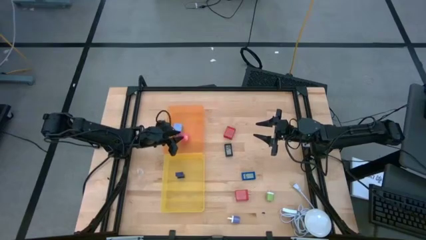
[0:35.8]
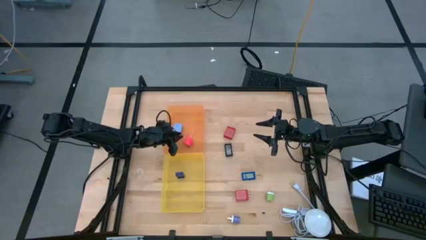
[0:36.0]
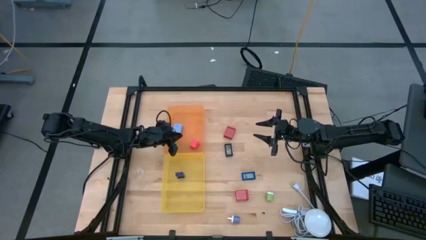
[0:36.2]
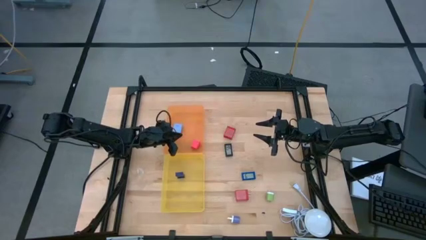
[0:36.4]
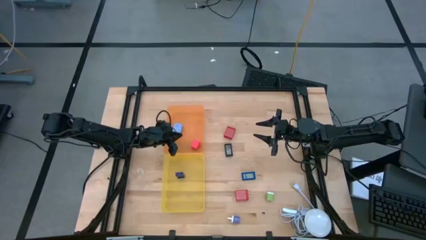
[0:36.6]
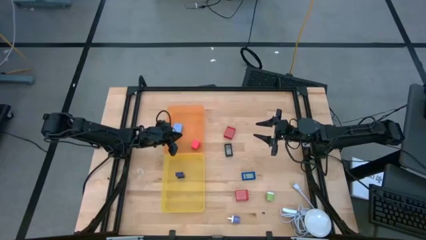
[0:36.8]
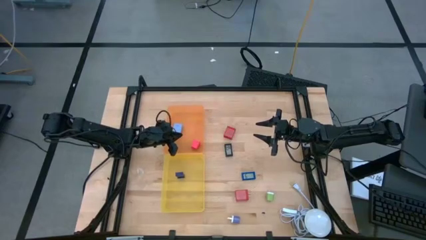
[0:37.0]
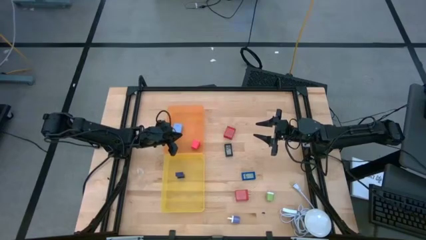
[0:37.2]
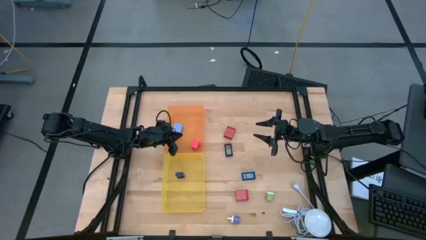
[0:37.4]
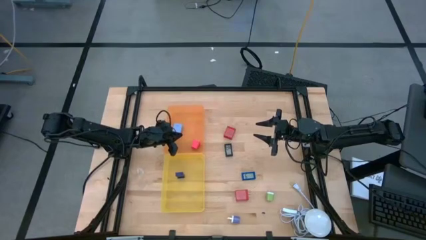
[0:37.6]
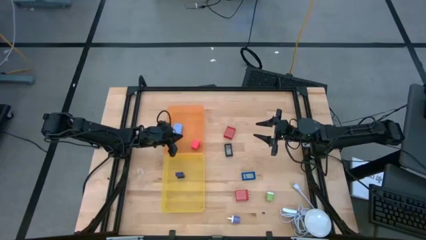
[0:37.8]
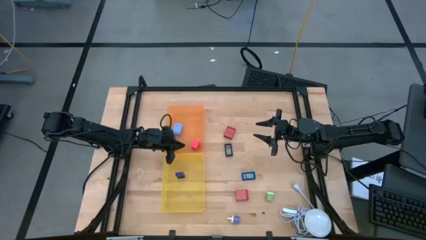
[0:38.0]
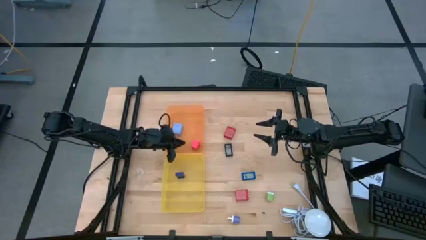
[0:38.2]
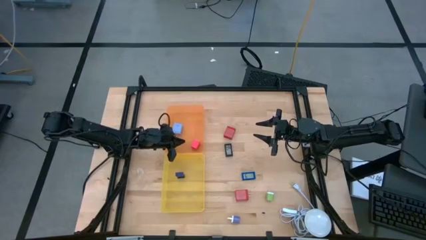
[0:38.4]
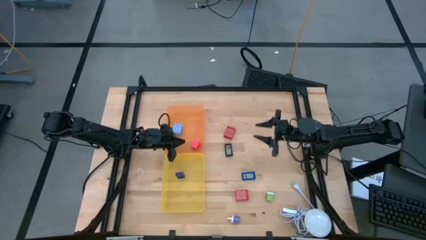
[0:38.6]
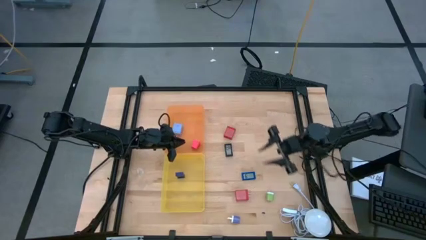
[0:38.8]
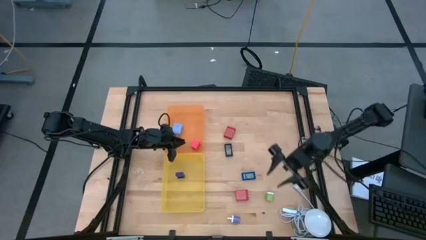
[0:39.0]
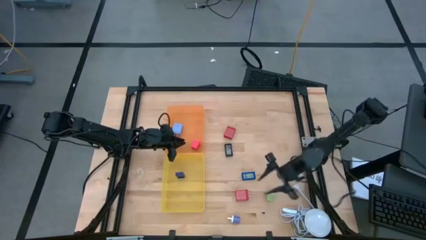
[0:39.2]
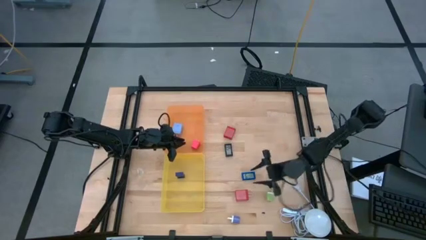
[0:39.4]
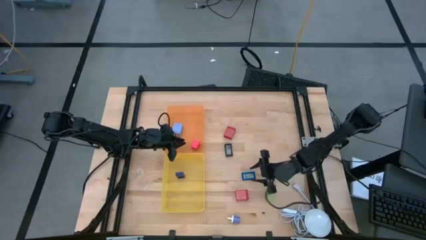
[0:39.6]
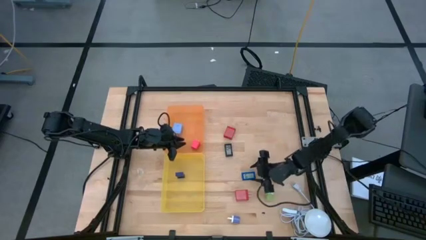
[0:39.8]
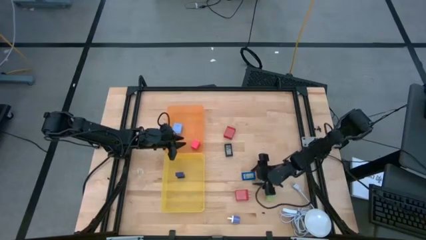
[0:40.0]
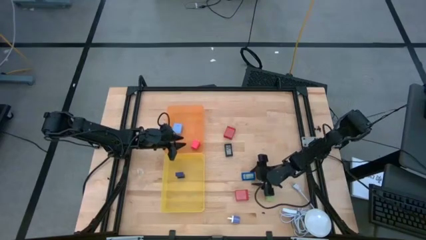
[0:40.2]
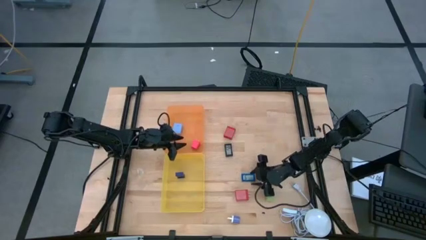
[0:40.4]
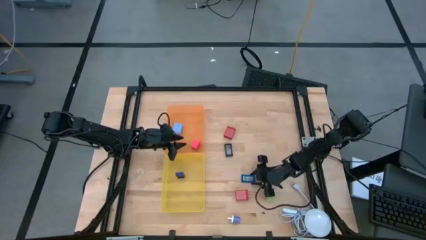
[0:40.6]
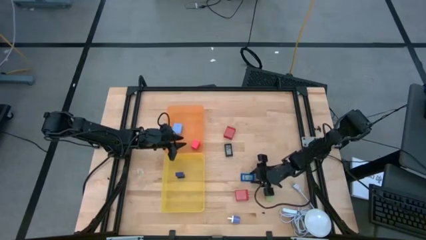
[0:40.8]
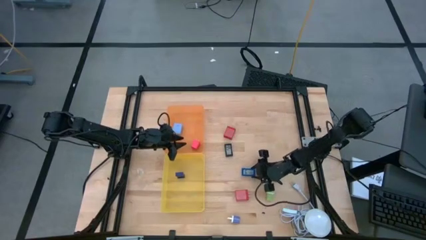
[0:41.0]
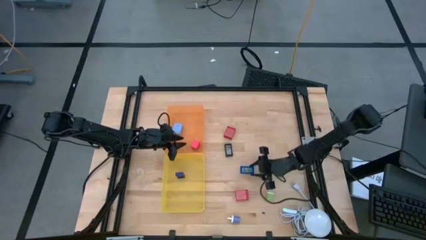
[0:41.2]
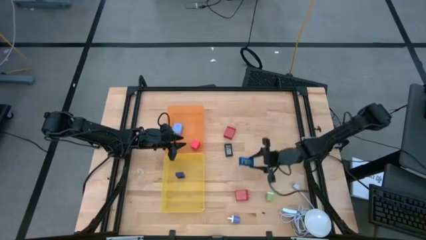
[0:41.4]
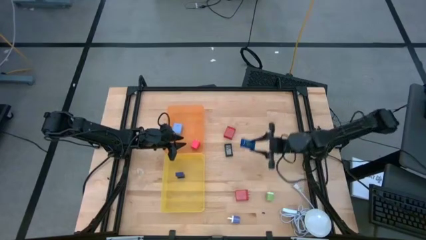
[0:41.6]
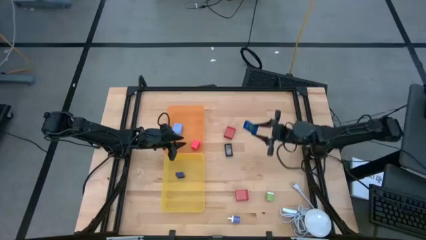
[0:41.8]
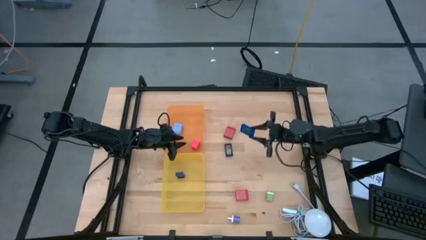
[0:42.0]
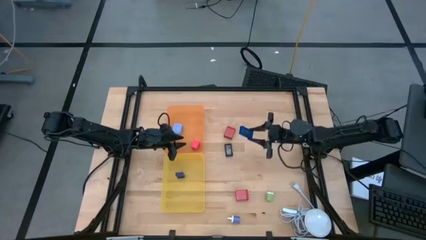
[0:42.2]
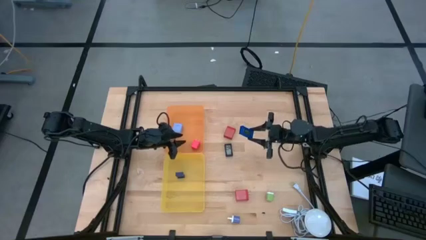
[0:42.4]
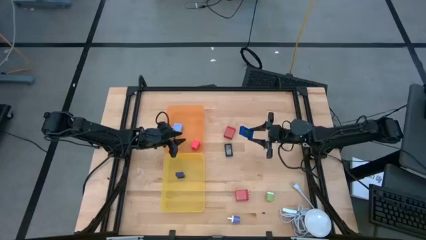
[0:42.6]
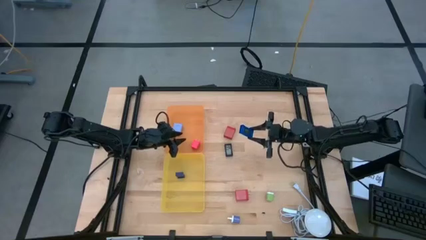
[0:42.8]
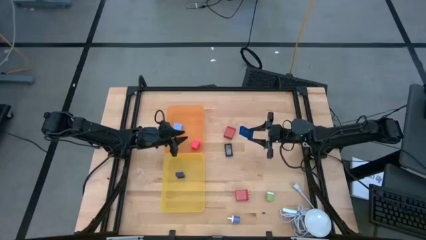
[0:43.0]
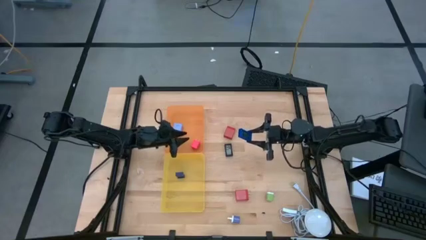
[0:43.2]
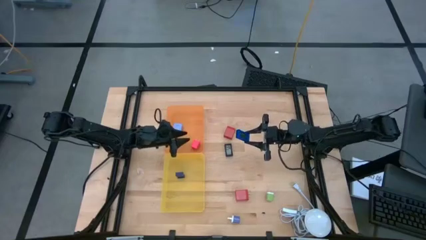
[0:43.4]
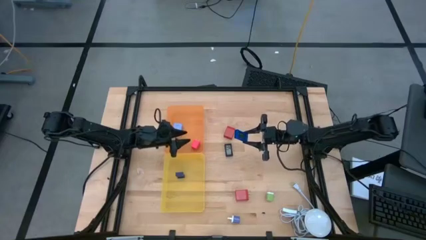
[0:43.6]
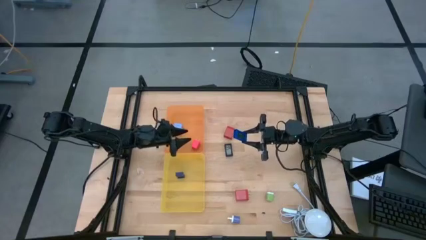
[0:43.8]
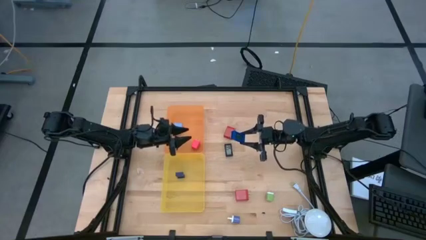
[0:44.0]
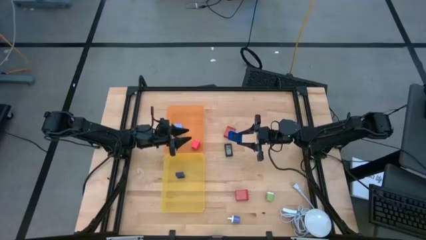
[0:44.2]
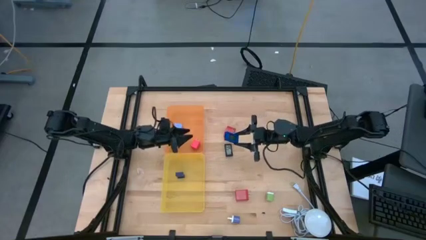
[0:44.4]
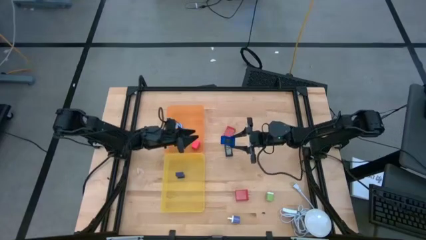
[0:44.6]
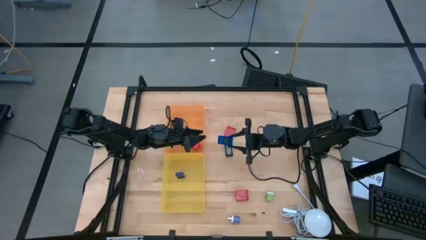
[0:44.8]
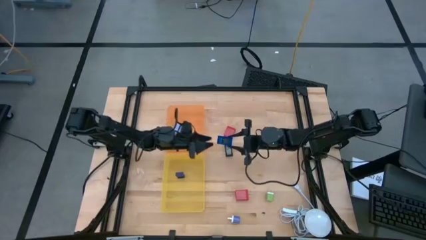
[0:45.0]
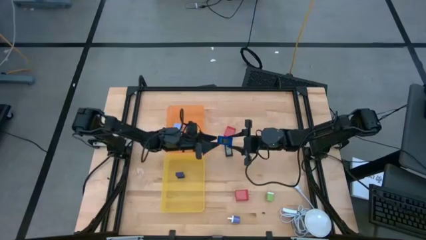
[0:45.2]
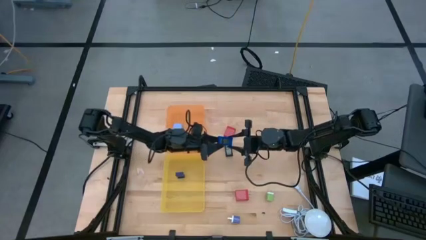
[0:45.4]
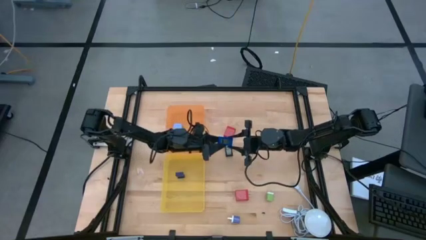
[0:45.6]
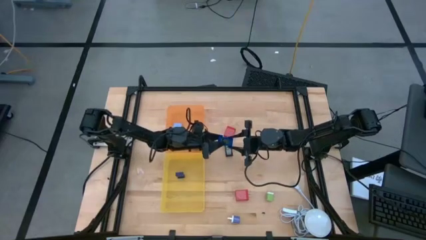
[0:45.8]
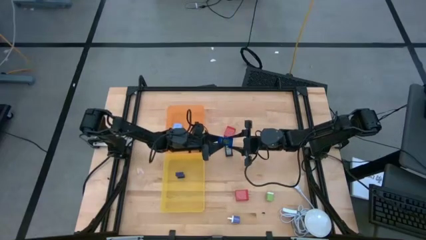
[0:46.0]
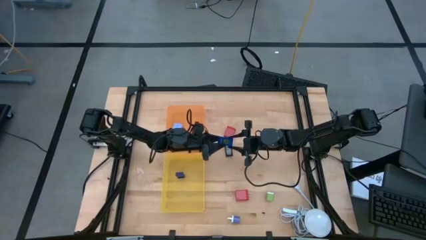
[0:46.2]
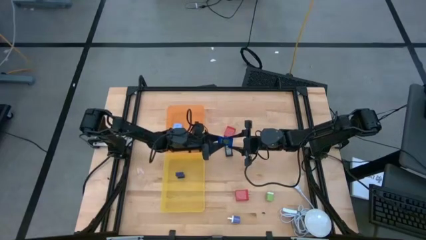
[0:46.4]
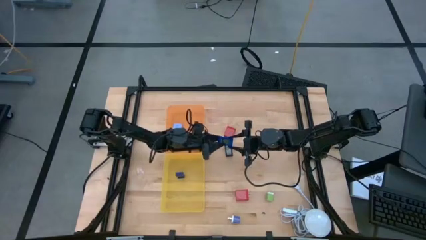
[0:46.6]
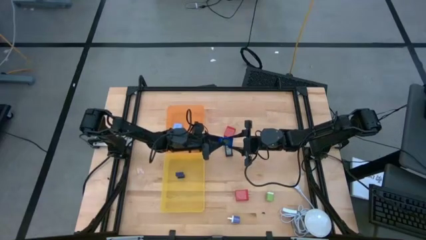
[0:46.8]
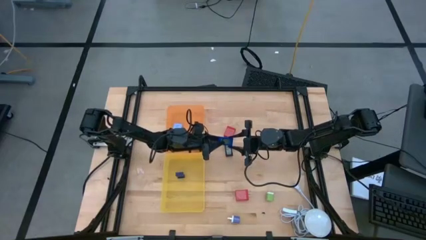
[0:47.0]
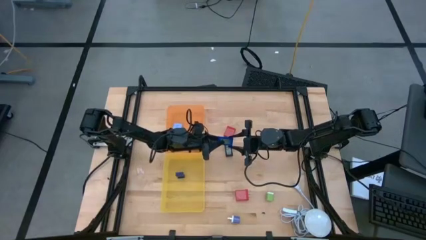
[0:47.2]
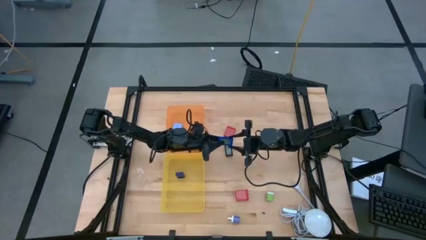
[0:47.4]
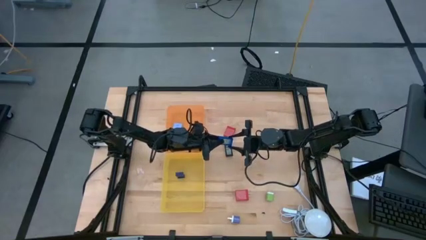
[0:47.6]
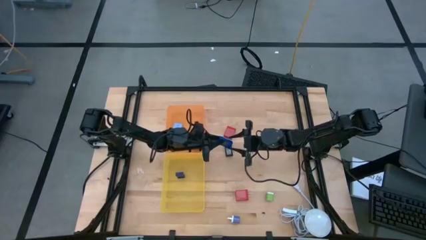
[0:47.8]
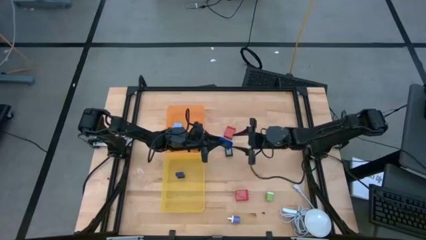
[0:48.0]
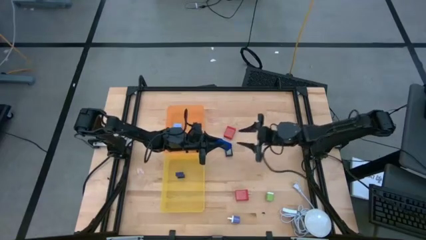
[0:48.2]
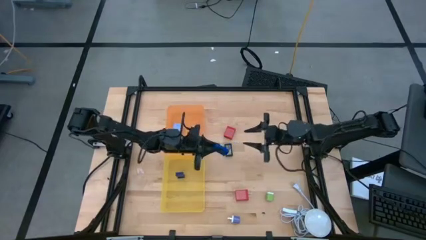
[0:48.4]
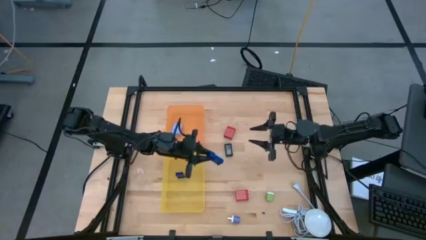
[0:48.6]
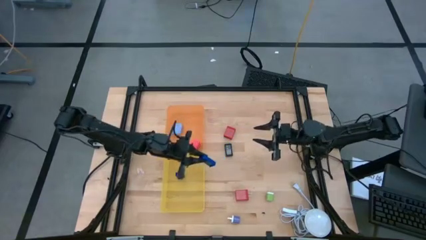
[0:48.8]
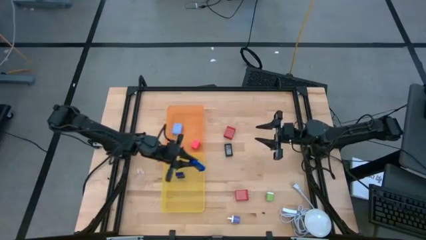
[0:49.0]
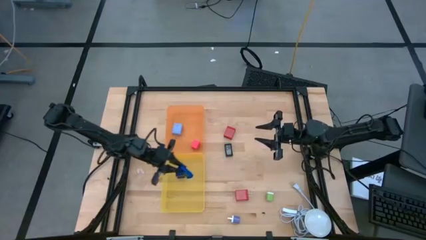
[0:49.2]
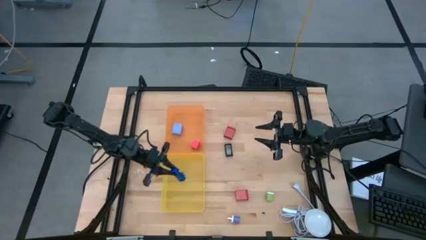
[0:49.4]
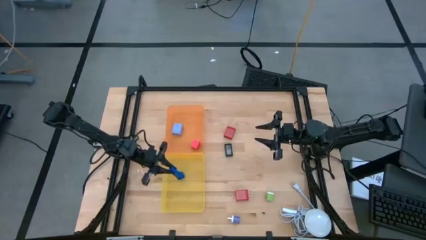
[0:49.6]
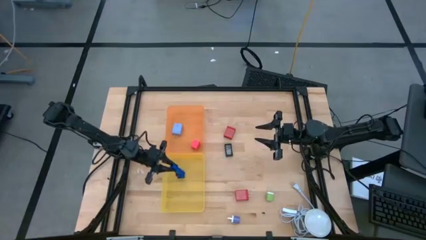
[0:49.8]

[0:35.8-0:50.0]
Task: Sort adapters and digital timers
Put the blue digital timer into the yellow bin
